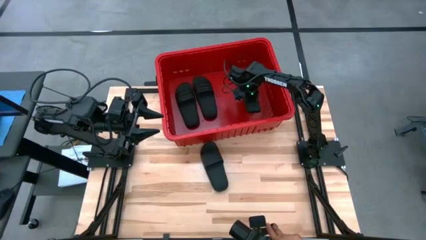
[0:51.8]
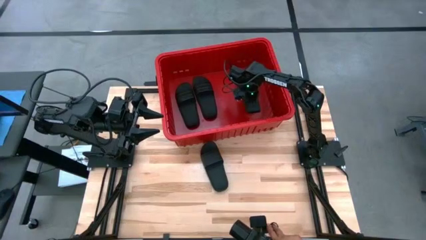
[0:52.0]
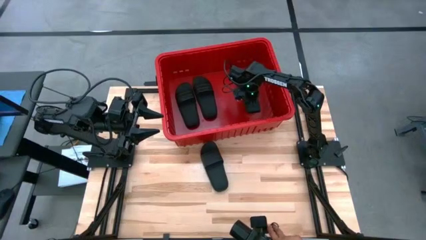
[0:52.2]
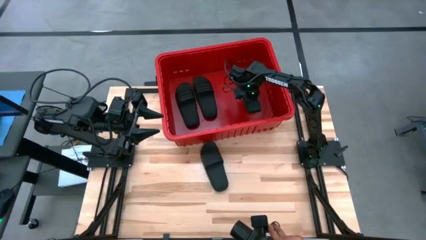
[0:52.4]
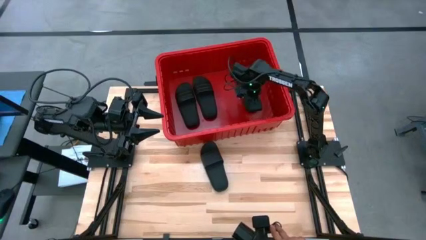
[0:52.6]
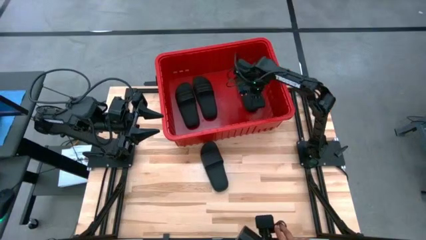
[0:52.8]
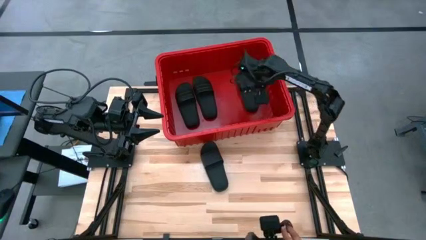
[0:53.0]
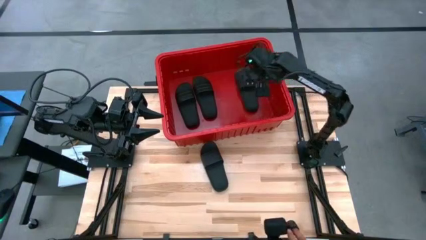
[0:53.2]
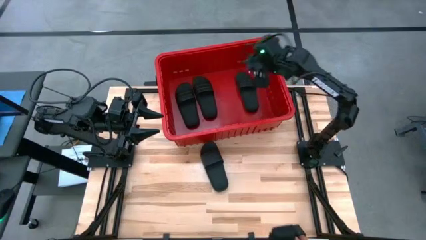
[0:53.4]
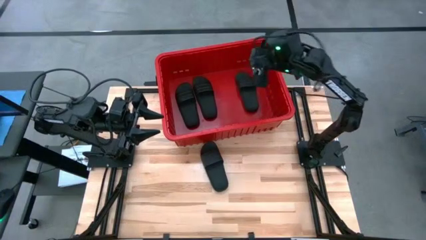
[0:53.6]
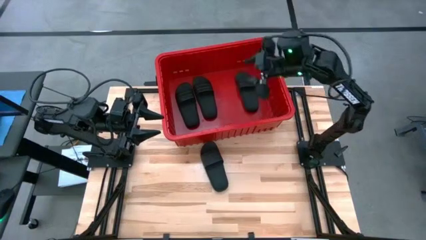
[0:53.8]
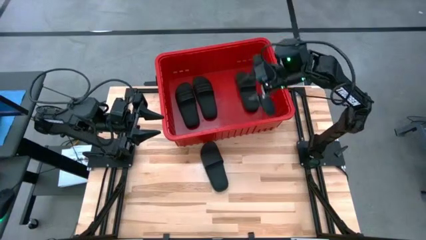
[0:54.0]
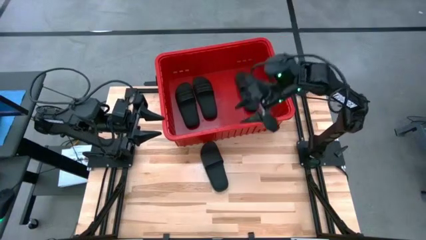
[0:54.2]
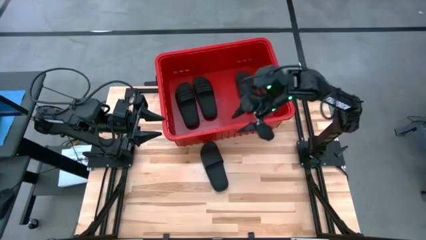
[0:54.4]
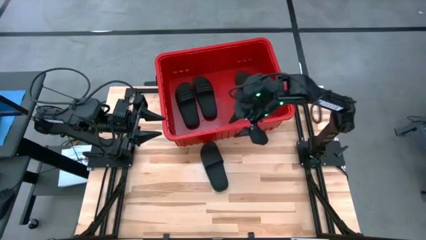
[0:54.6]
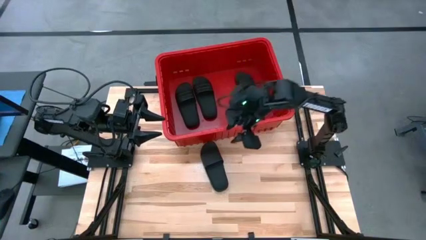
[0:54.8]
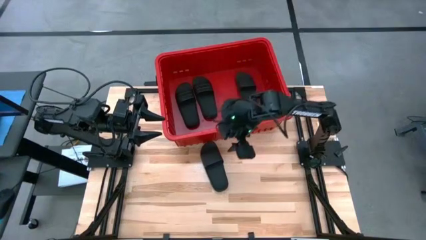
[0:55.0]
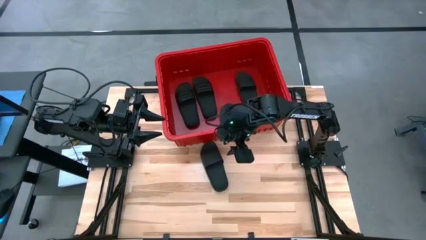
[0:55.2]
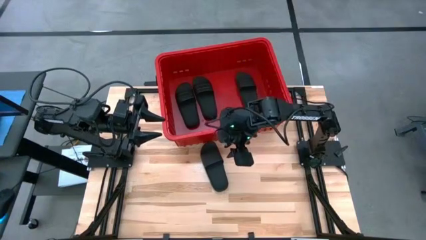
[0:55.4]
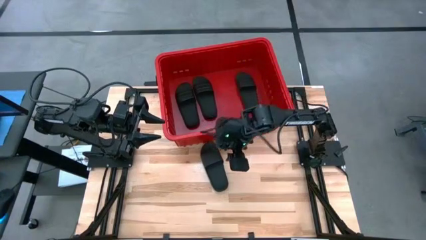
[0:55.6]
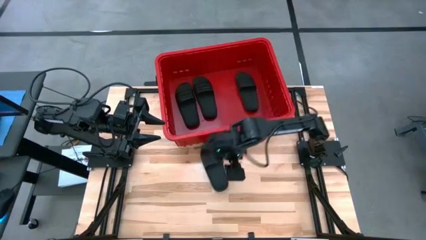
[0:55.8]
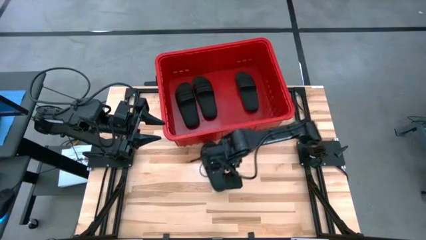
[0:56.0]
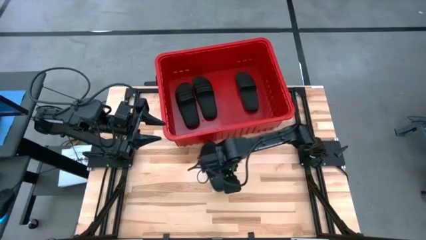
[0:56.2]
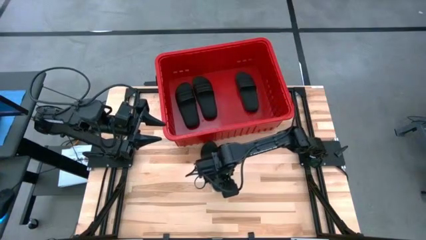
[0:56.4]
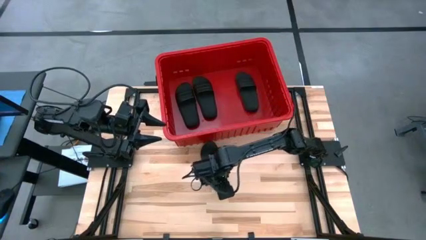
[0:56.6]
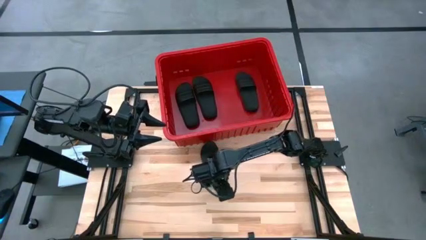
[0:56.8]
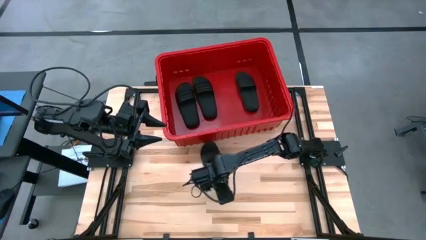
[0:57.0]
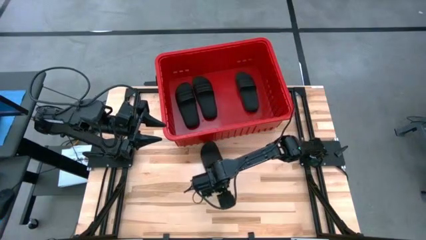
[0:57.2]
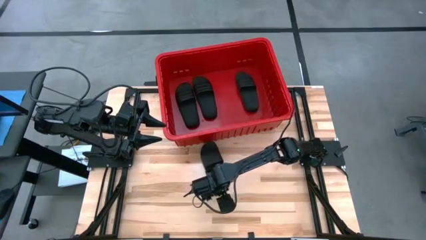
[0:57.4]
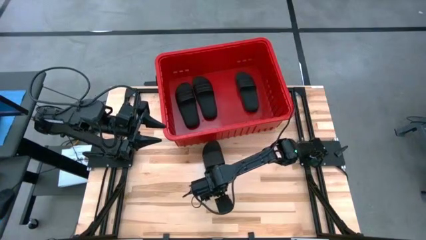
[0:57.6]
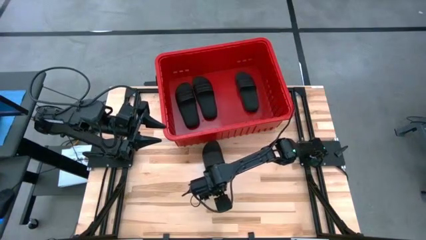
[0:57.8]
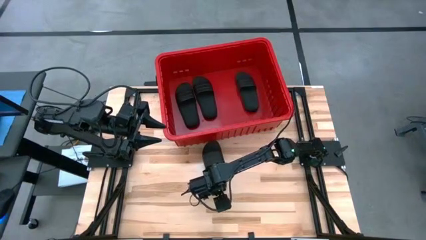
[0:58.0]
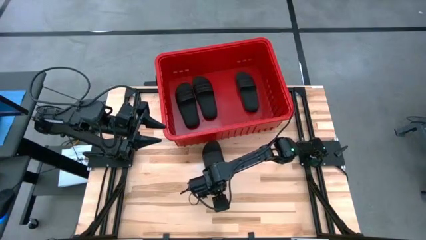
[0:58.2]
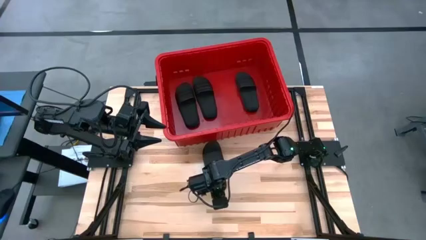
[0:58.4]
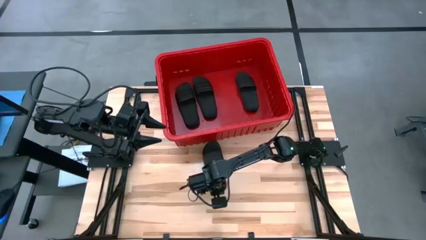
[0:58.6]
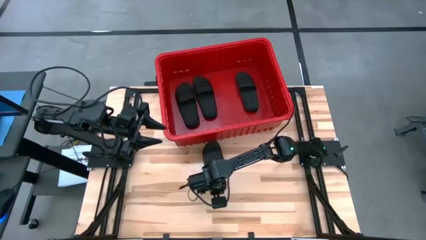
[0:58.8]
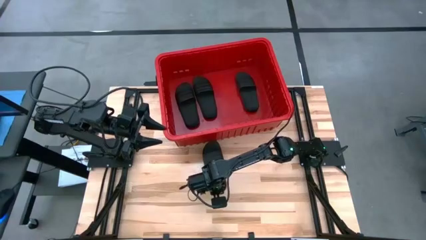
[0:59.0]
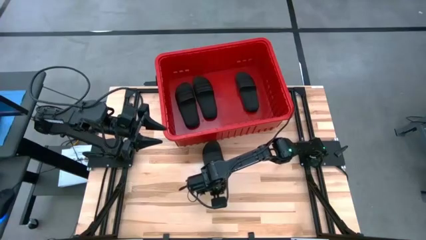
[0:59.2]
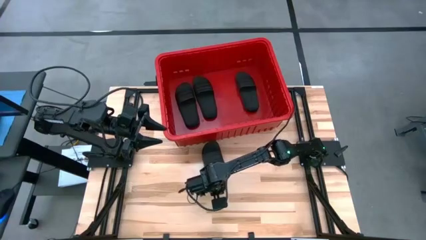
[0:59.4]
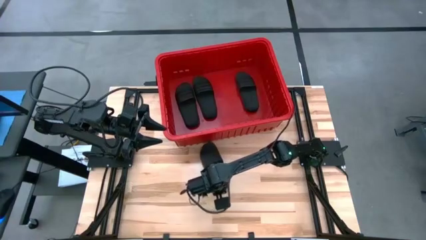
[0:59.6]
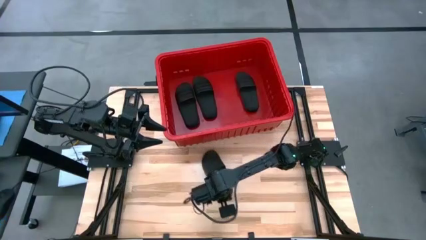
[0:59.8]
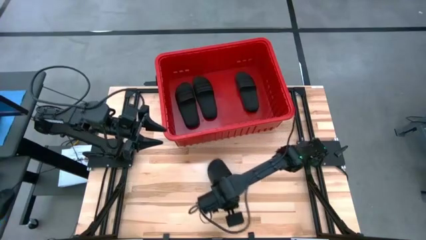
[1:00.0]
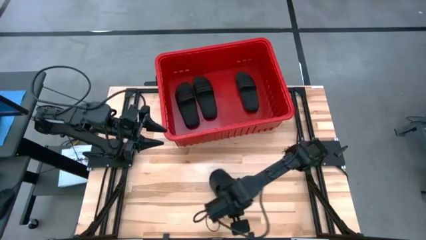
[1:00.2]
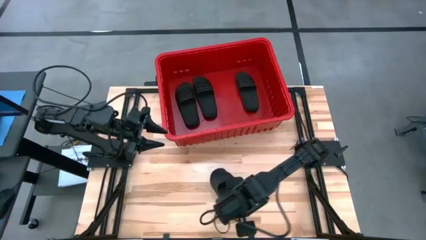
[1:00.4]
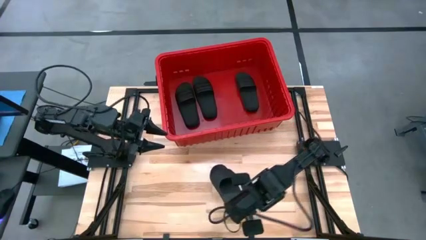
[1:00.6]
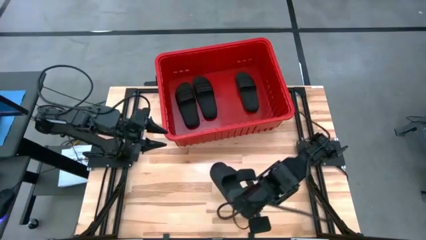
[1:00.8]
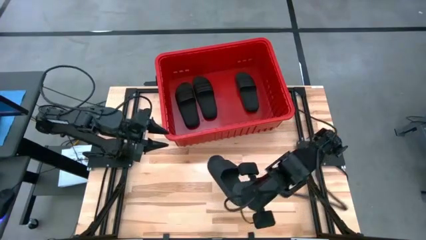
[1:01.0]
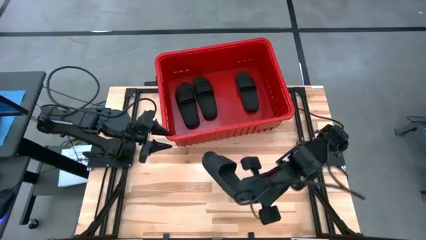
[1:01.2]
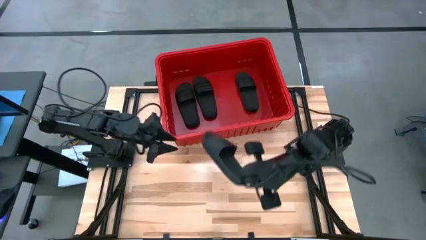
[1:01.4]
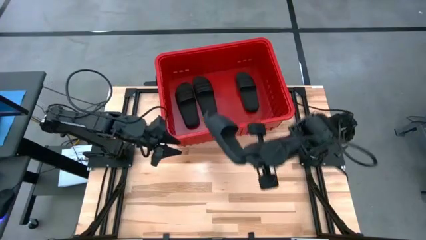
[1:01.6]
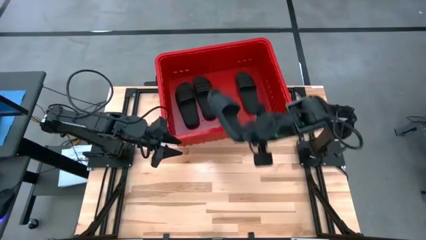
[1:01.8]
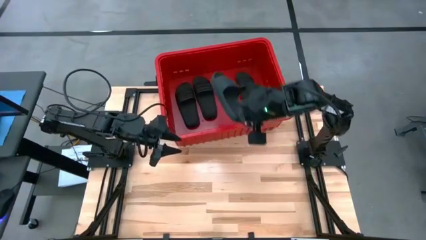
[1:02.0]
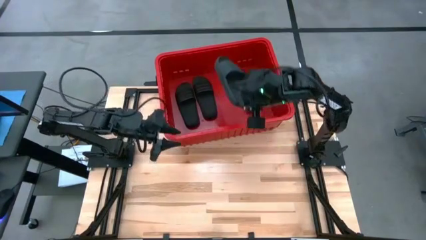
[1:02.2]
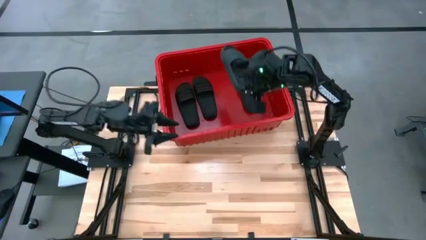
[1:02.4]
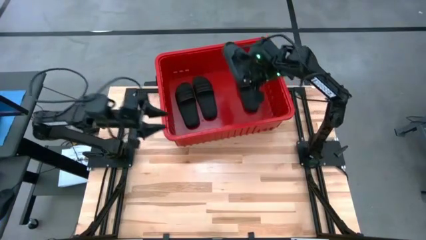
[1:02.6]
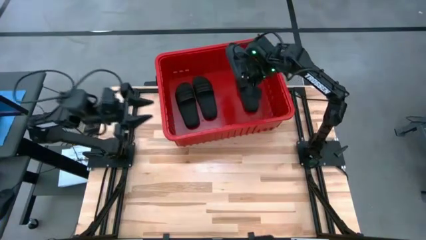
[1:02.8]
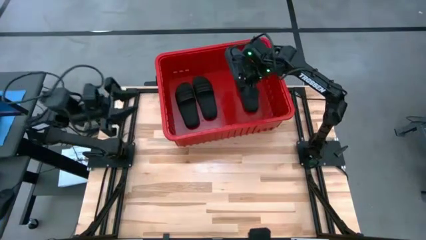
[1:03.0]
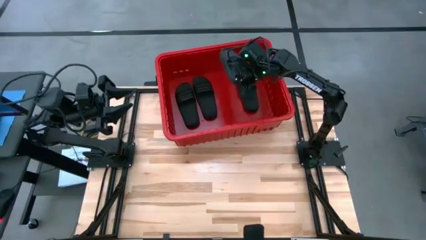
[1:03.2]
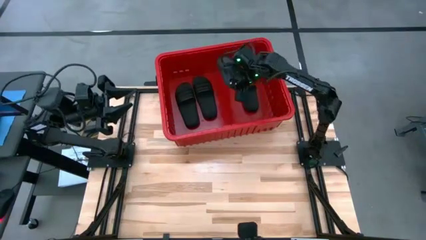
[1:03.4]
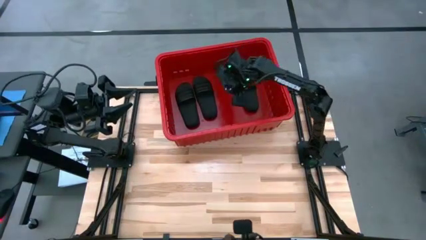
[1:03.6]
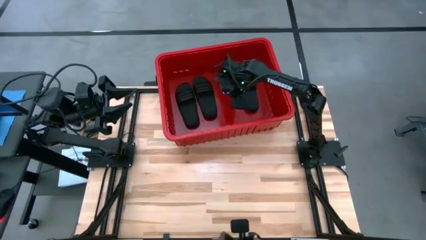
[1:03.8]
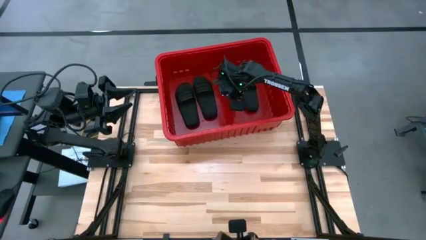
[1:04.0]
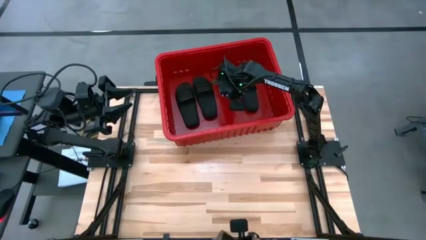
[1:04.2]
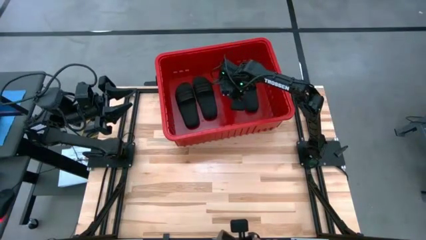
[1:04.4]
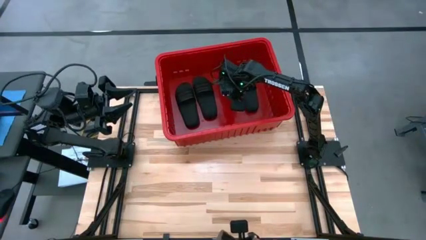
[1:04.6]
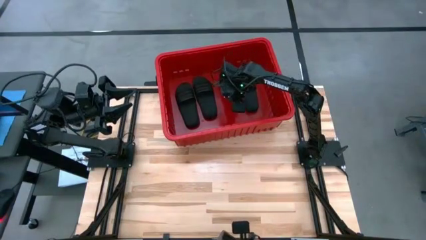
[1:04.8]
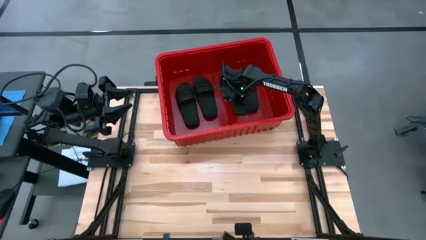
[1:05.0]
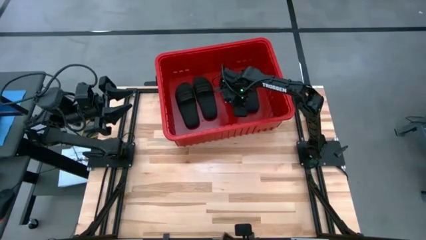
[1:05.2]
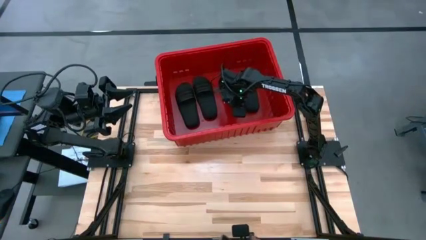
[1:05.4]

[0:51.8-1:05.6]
Task: Pick and place slides into bin
Put the black slides into the red bin
